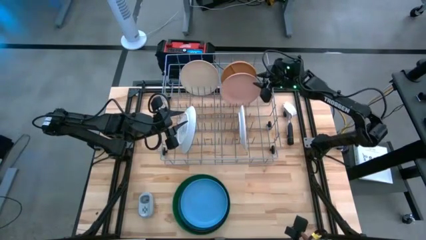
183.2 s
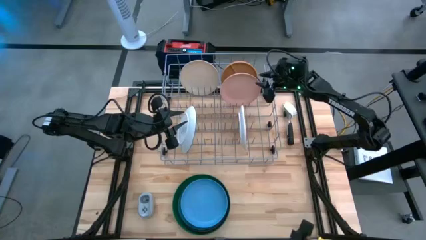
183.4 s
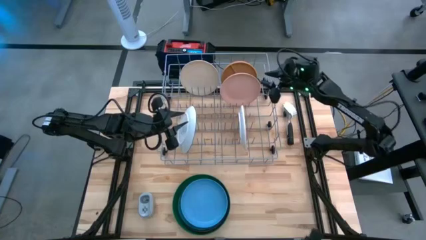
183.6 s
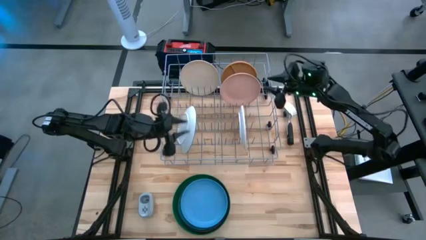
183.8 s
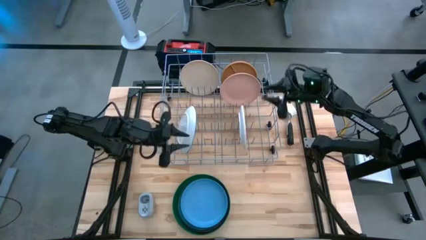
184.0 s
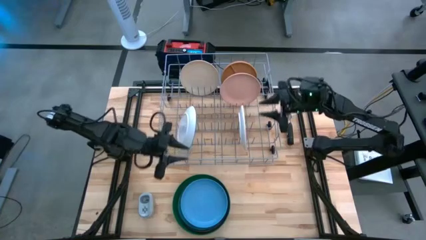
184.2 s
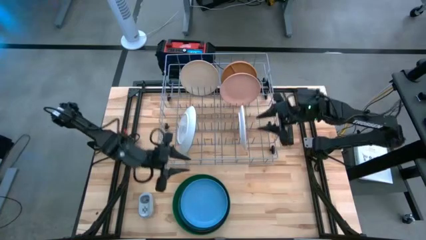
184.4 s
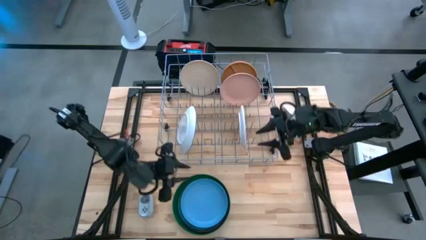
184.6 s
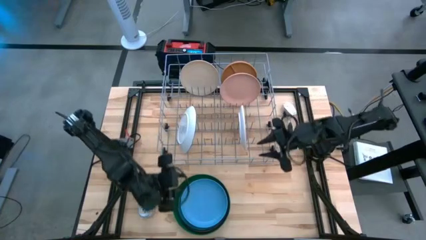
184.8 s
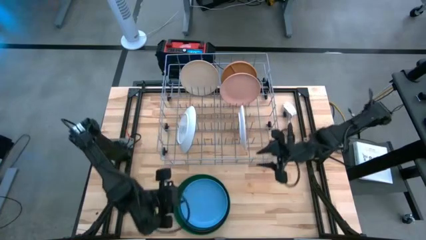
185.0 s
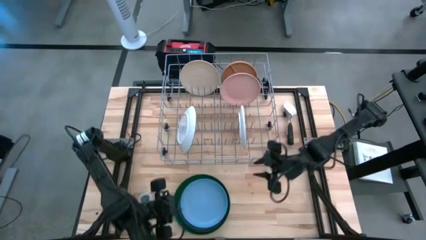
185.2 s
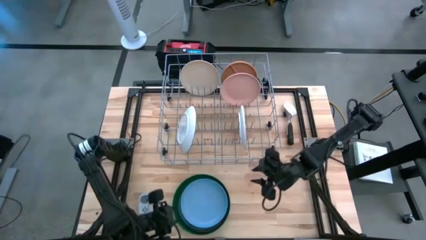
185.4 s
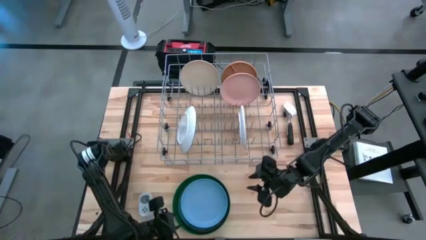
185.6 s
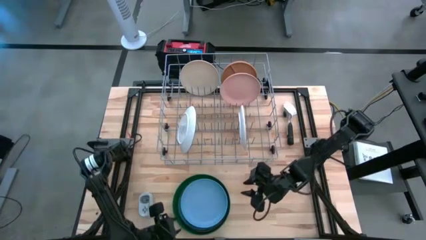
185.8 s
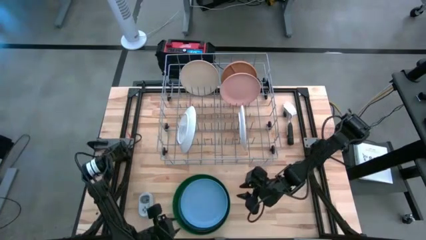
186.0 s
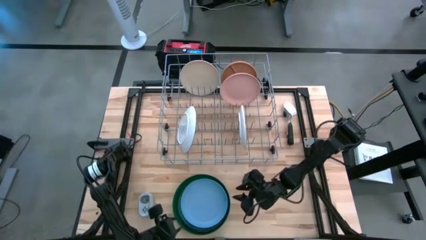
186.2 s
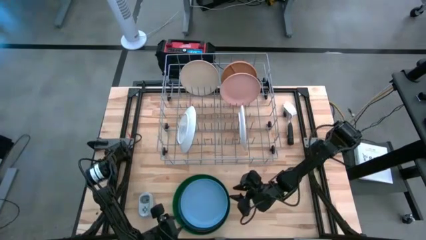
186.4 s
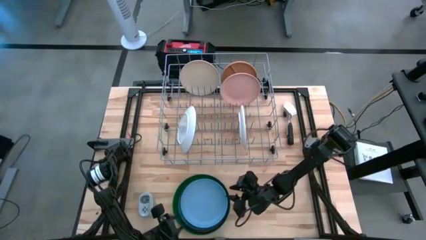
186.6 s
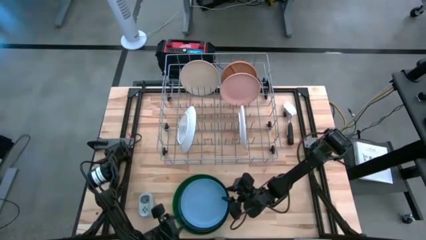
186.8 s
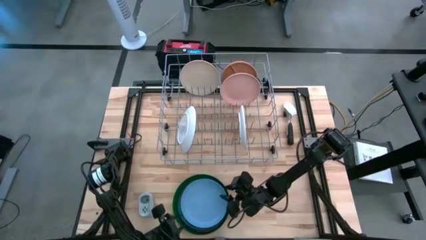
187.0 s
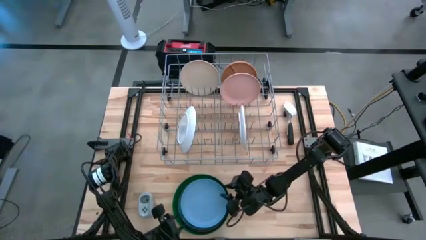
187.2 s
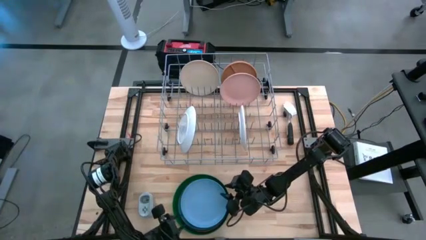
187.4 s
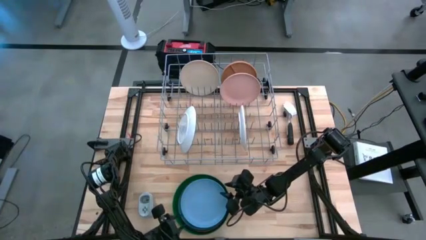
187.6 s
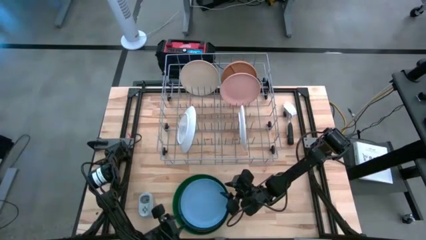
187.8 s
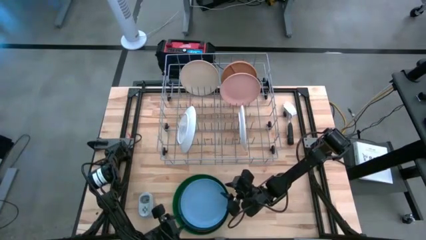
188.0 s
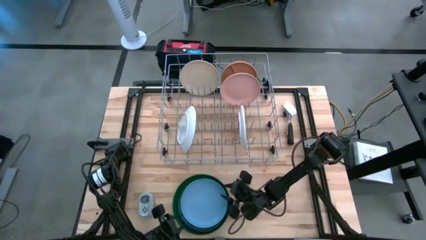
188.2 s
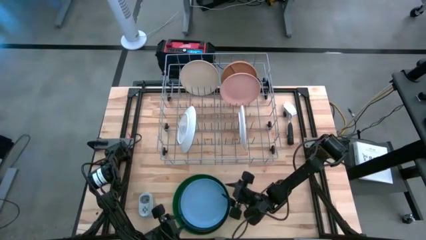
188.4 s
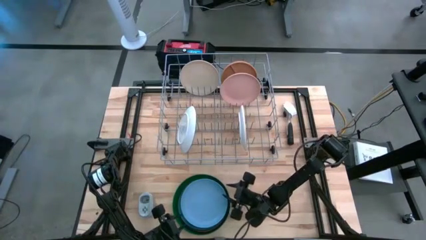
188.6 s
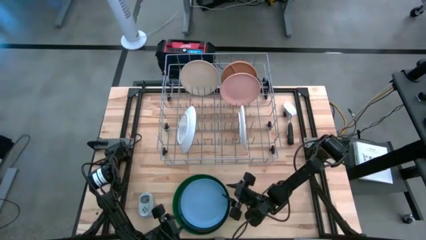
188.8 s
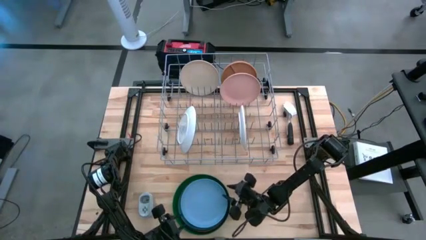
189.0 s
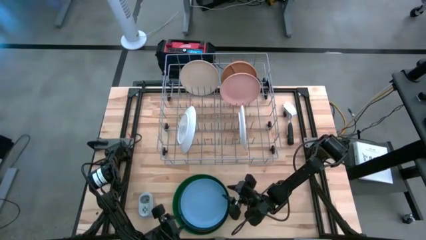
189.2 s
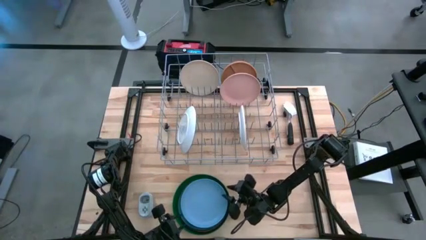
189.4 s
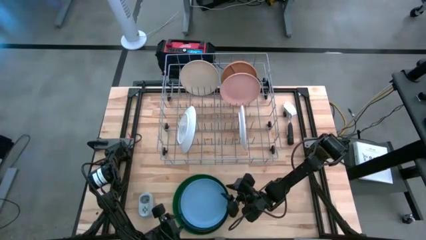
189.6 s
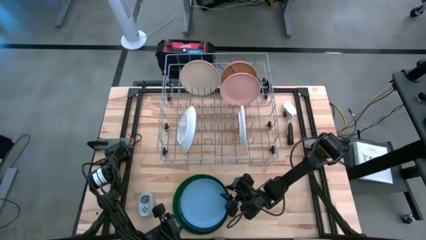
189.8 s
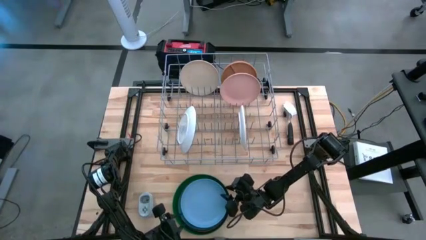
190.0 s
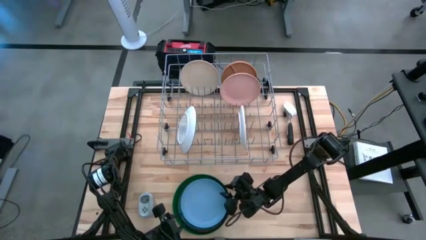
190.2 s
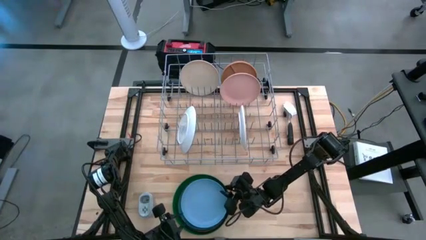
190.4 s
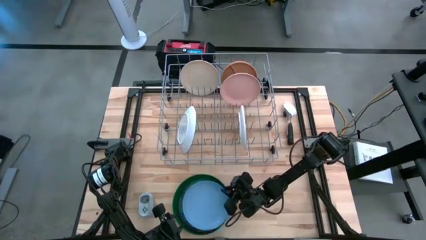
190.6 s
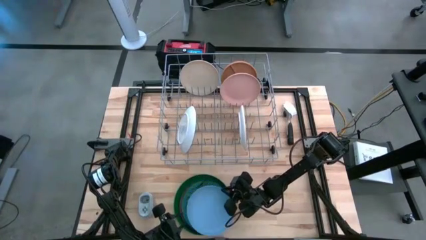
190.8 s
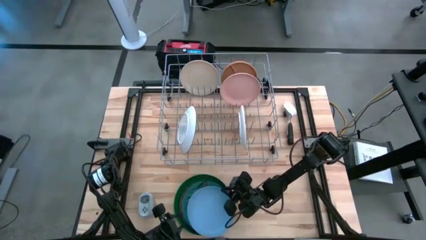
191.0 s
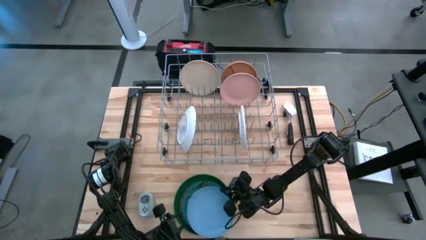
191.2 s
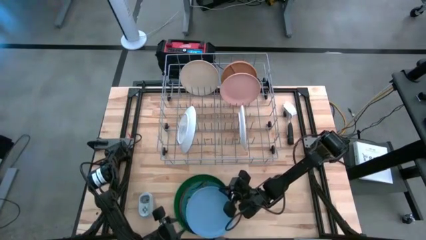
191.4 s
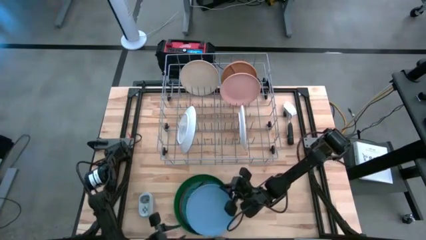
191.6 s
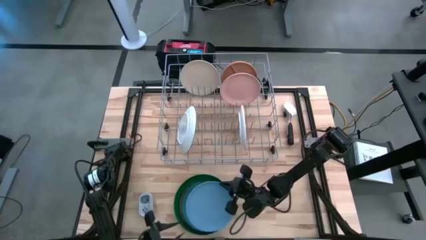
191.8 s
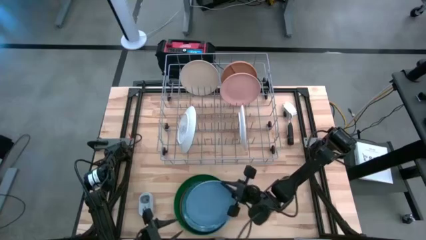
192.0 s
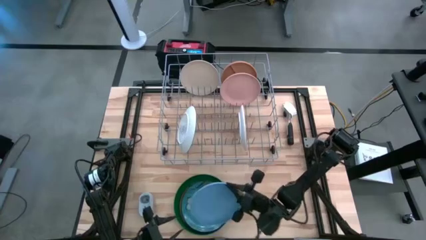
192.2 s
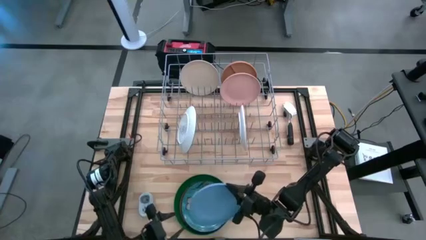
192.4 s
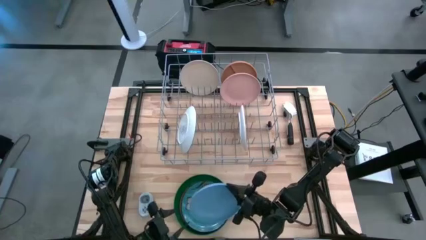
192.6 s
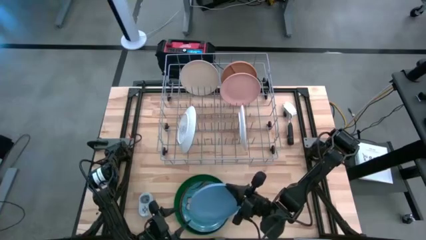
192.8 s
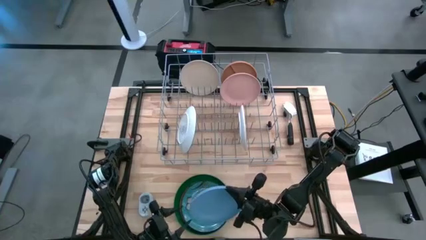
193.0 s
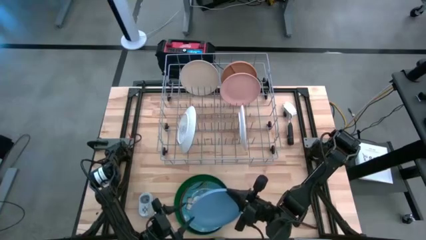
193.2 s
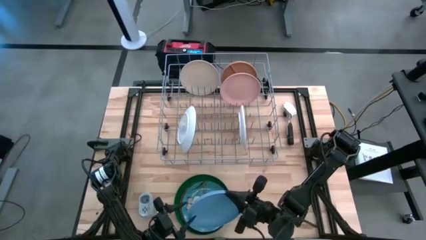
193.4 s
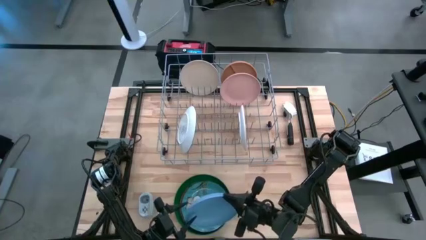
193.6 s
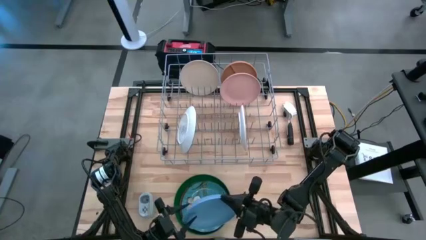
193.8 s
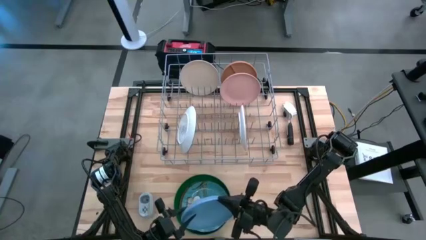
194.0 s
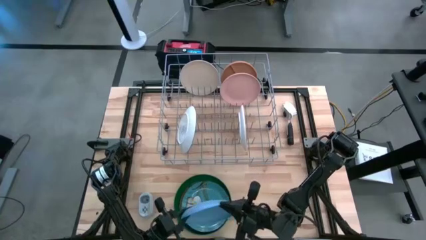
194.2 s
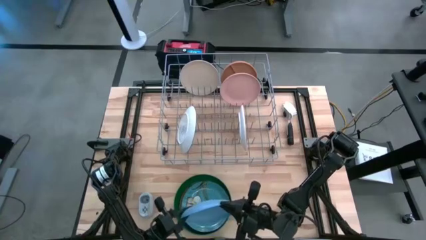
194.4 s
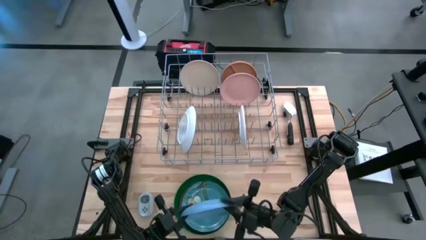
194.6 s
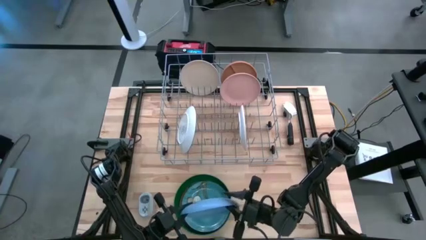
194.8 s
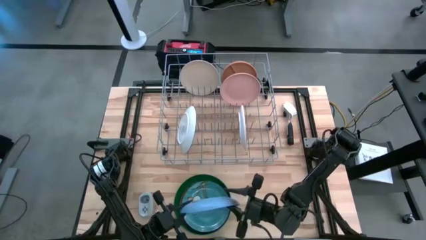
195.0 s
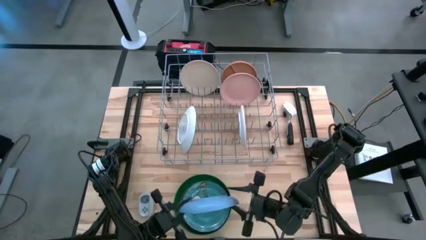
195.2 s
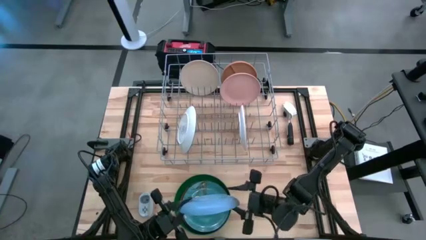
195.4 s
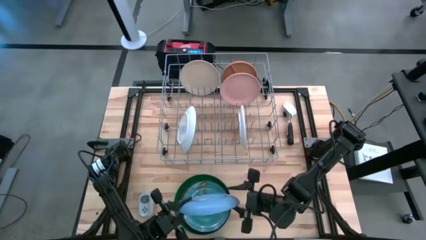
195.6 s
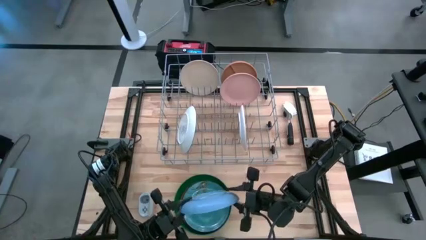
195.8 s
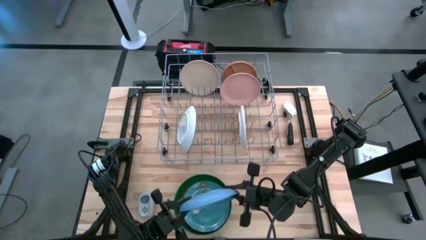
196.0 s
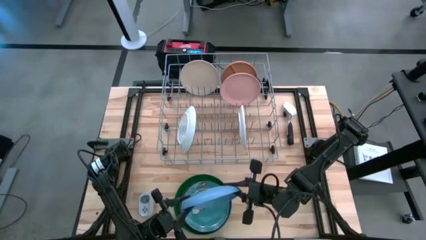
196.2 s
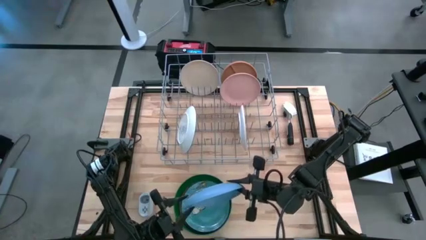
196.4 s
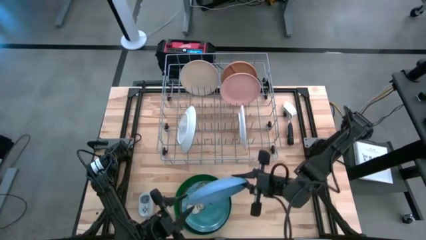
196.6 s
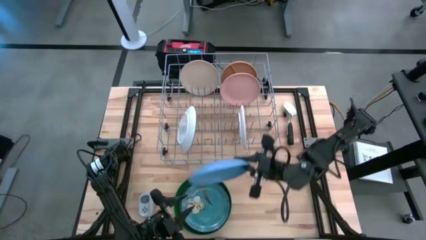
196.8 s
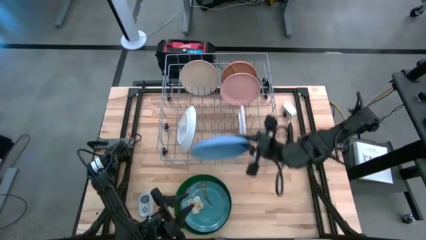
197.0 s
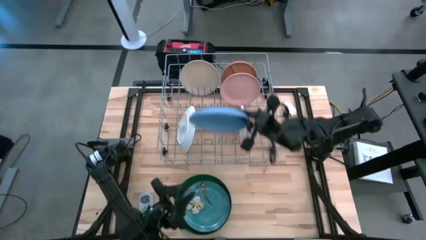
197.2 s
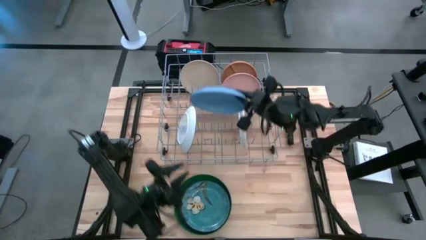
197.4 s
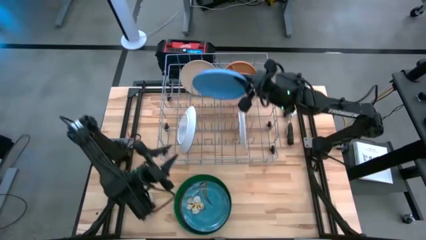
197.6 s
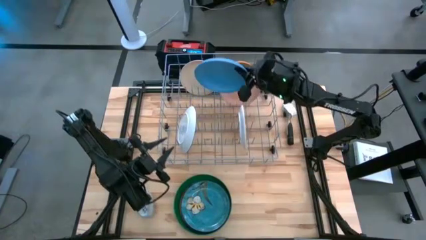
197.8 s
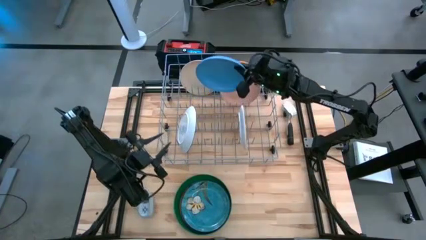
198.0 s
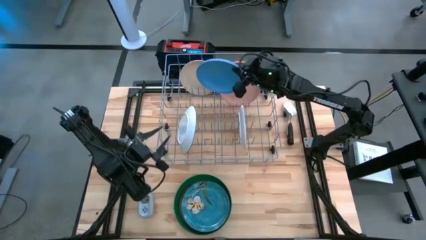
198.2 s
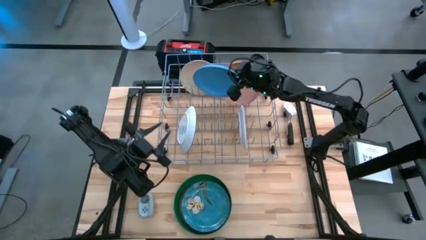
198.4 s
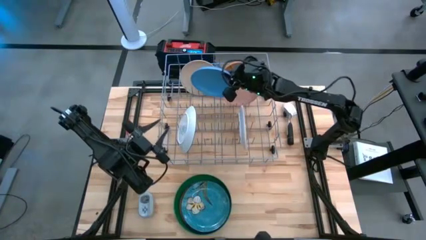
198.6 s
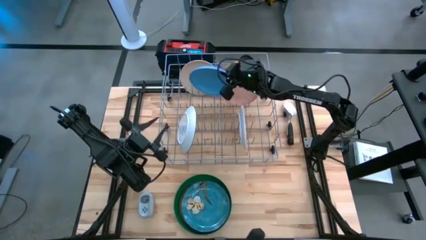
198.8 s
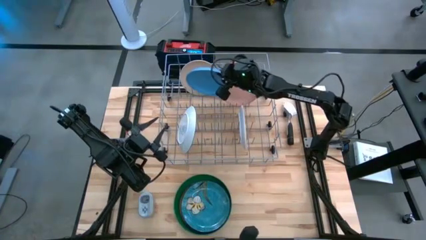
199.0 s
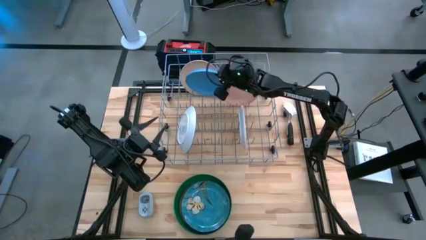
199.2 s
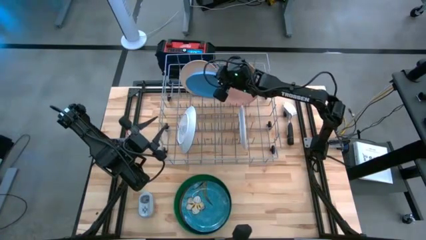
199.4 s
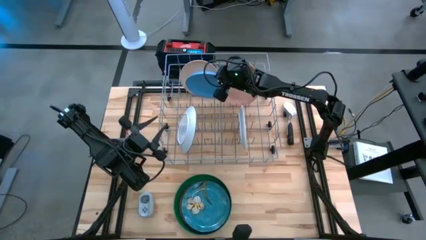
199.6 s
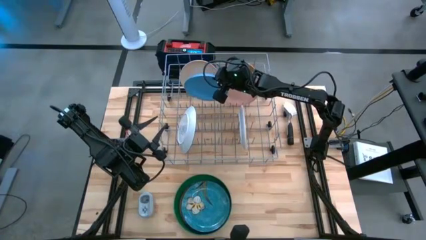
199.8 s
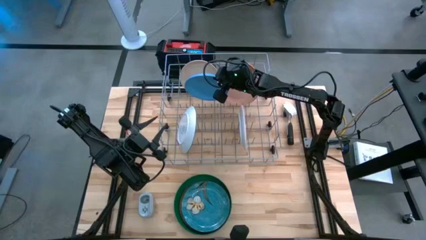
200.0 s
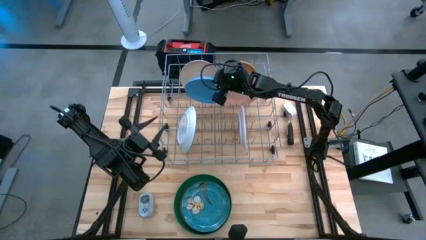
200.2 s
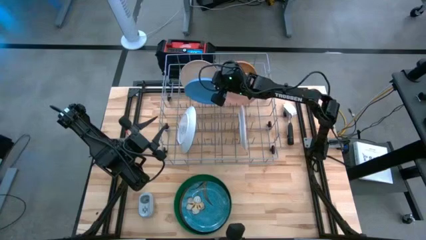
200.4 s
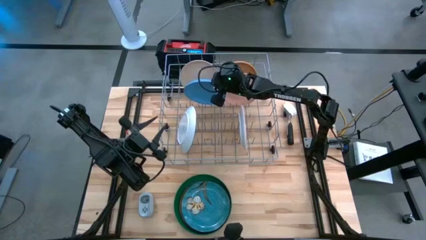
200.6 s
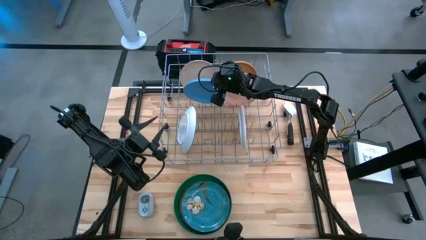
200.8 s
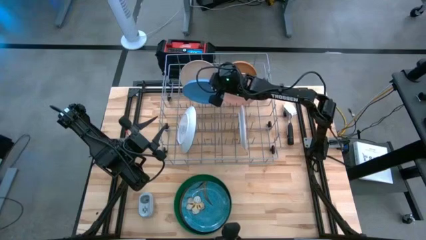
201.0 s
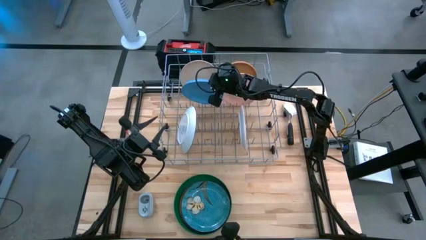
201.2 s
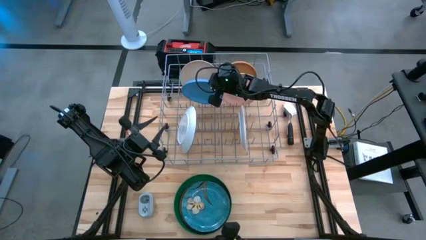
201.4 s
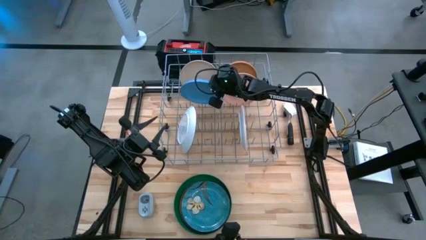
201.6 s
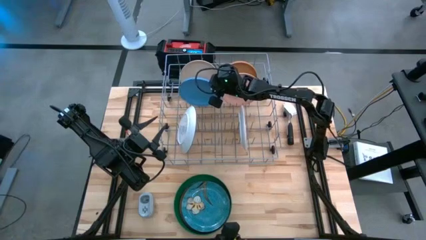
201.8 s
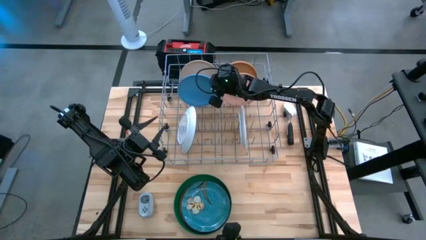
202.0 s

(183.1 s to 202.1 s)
Task: Sort dishes
Put the blue plate into the dish rack
